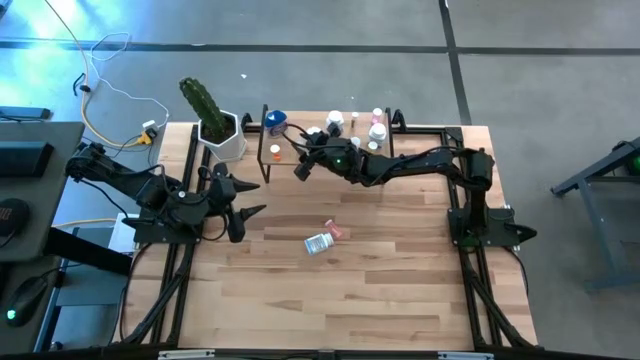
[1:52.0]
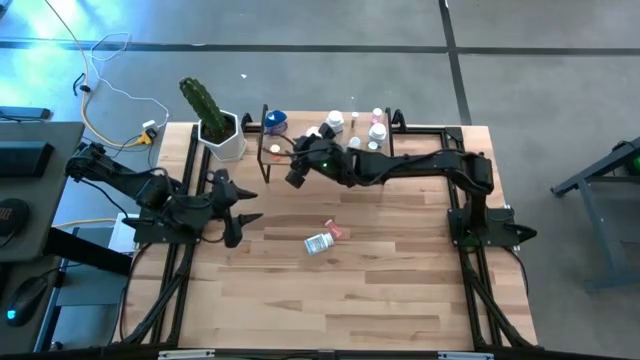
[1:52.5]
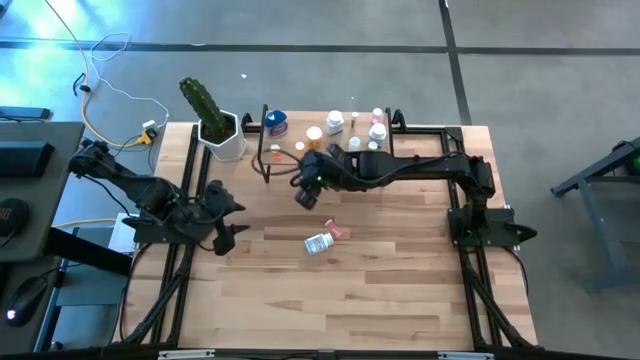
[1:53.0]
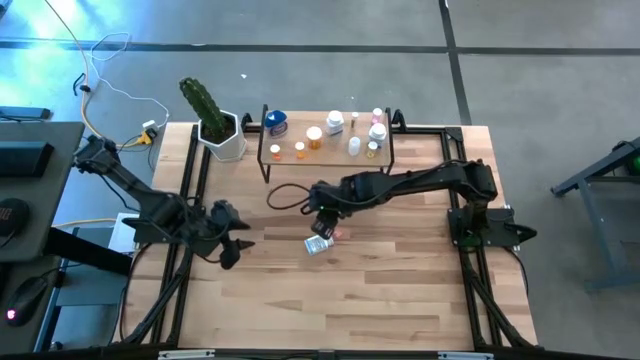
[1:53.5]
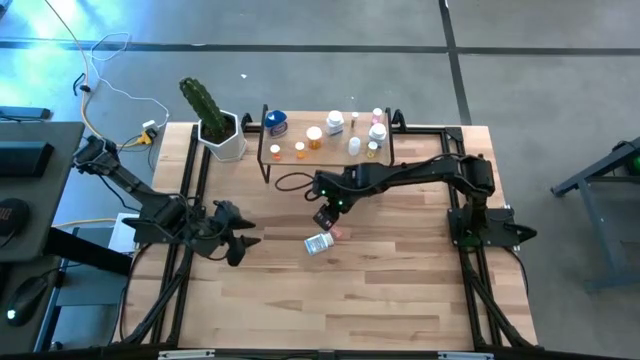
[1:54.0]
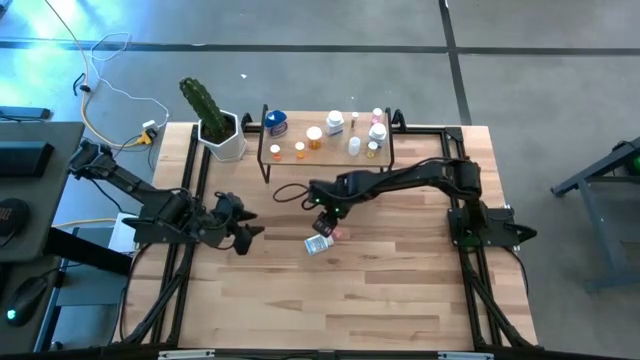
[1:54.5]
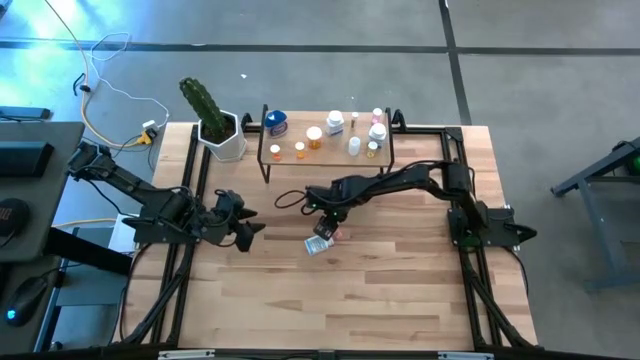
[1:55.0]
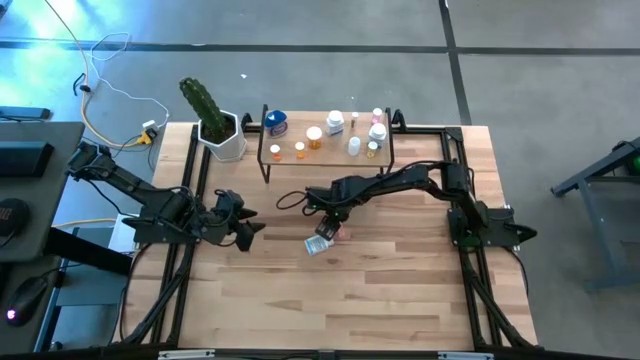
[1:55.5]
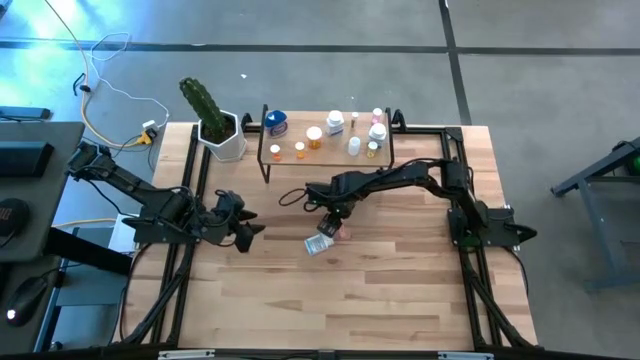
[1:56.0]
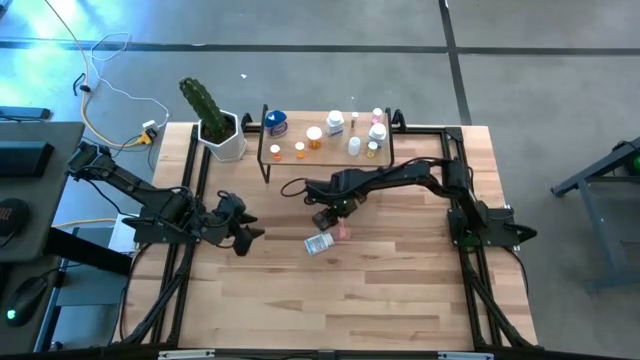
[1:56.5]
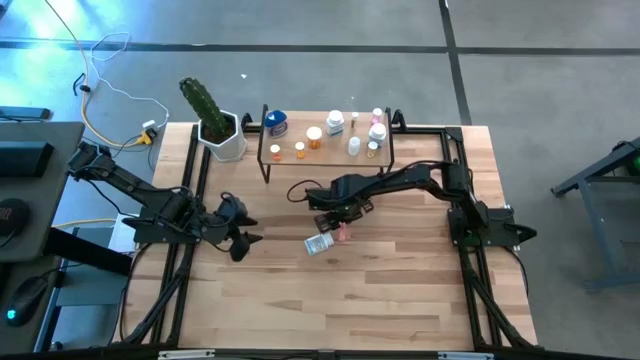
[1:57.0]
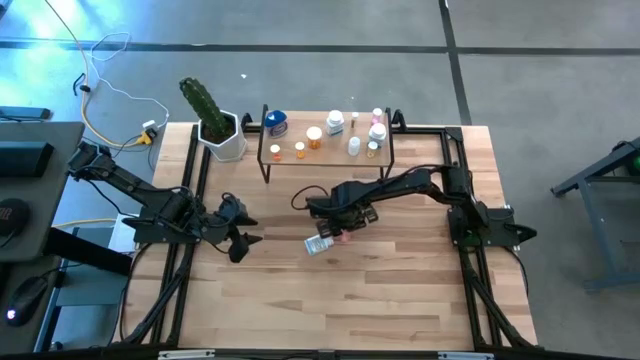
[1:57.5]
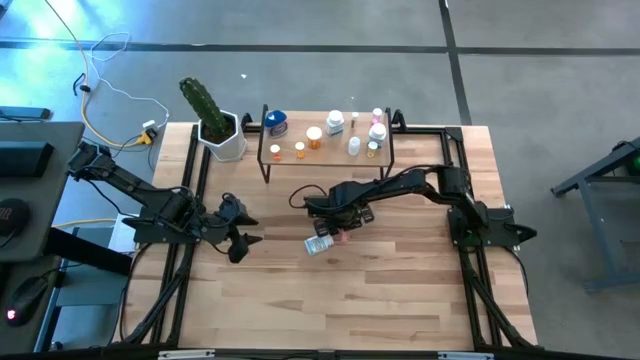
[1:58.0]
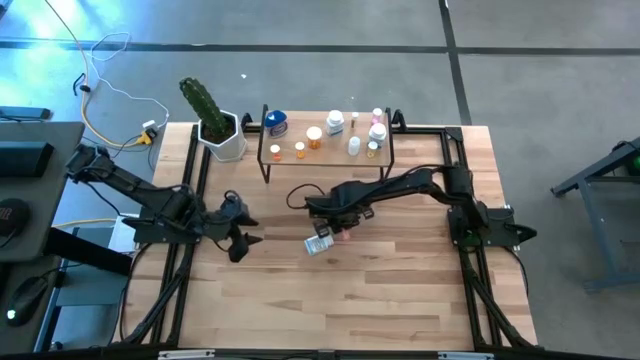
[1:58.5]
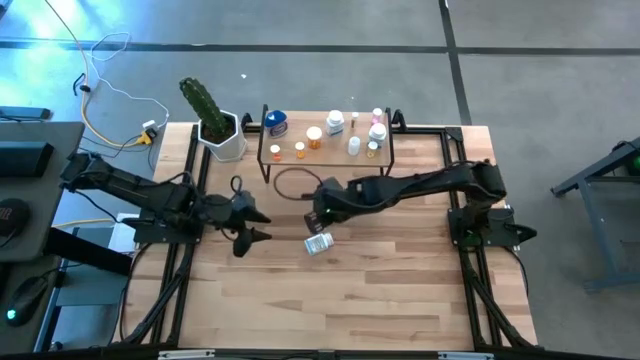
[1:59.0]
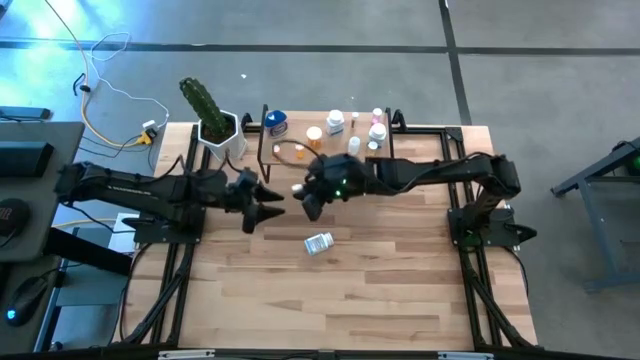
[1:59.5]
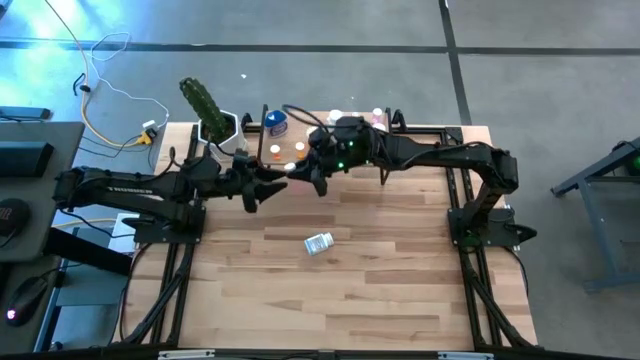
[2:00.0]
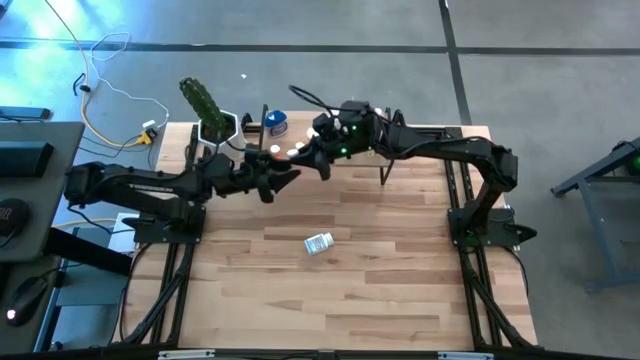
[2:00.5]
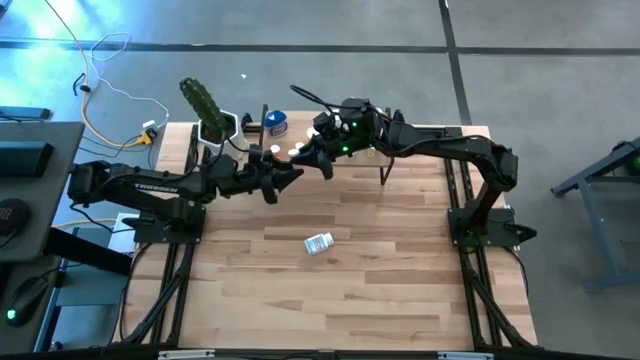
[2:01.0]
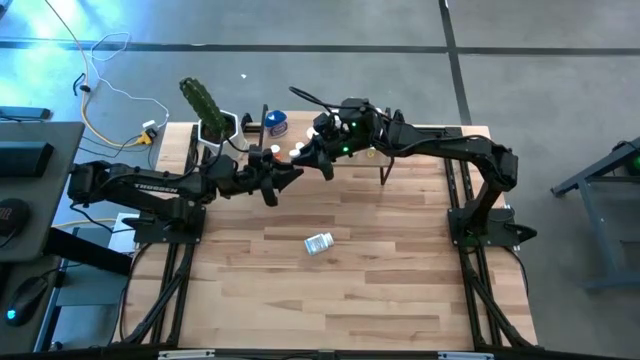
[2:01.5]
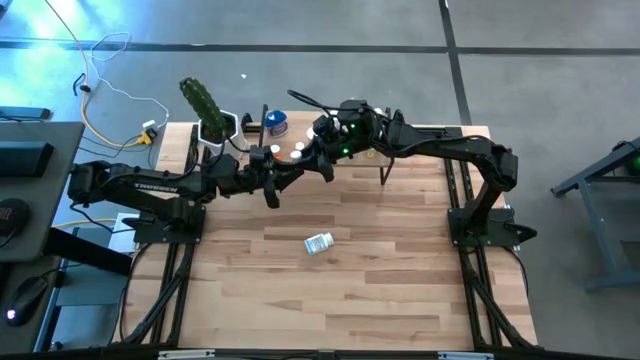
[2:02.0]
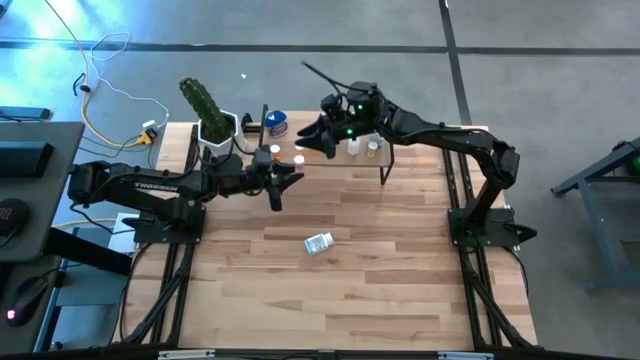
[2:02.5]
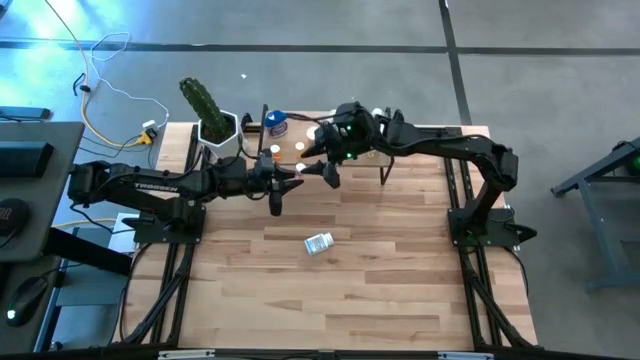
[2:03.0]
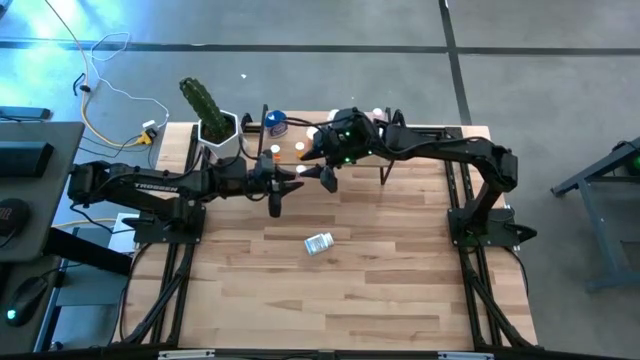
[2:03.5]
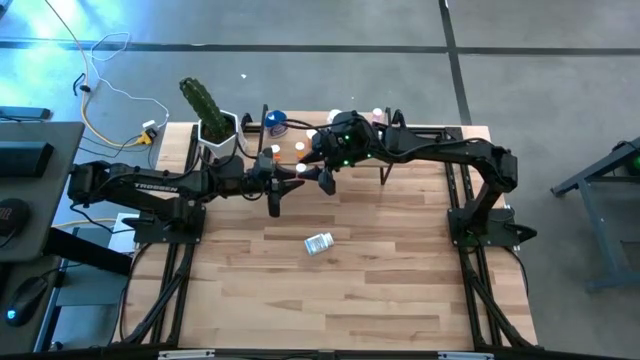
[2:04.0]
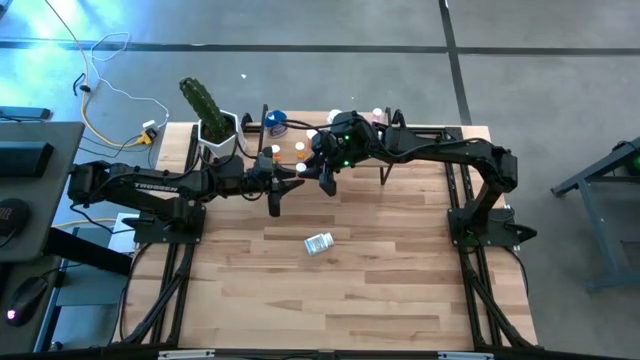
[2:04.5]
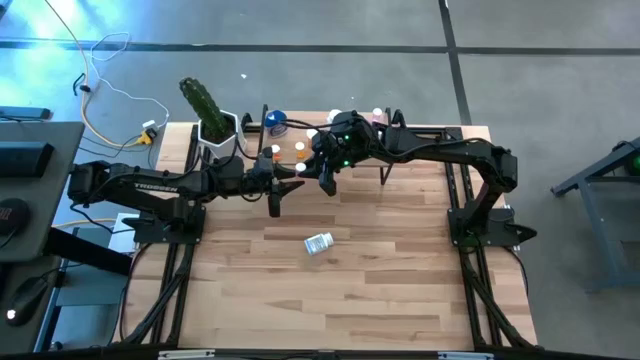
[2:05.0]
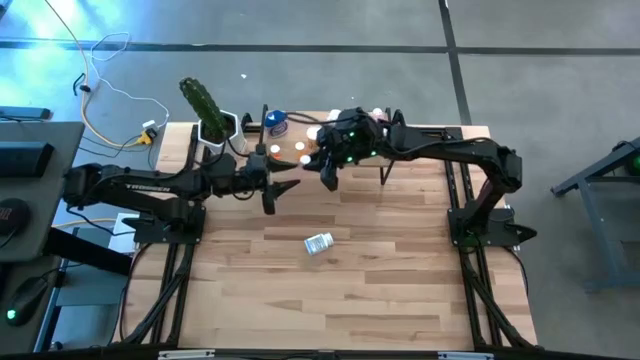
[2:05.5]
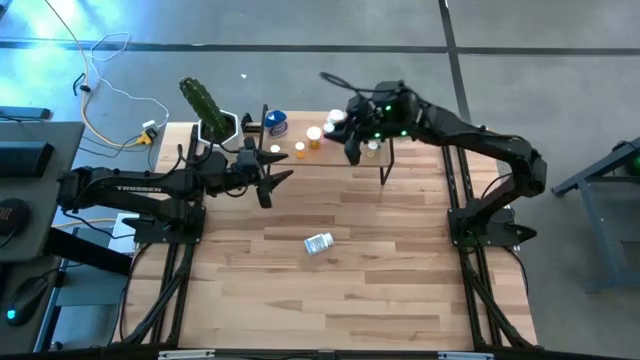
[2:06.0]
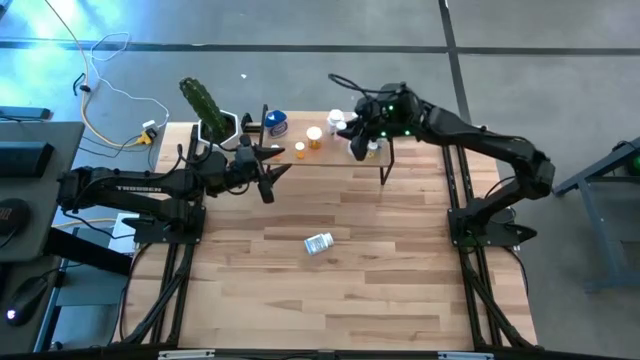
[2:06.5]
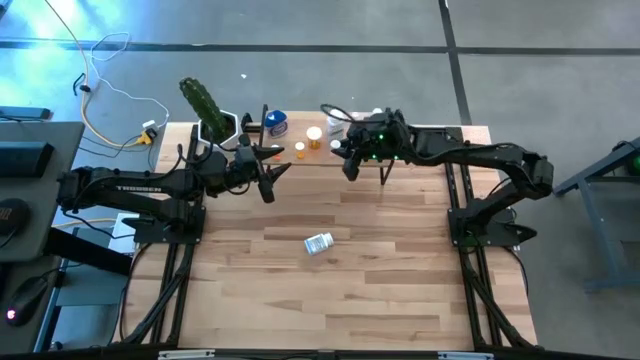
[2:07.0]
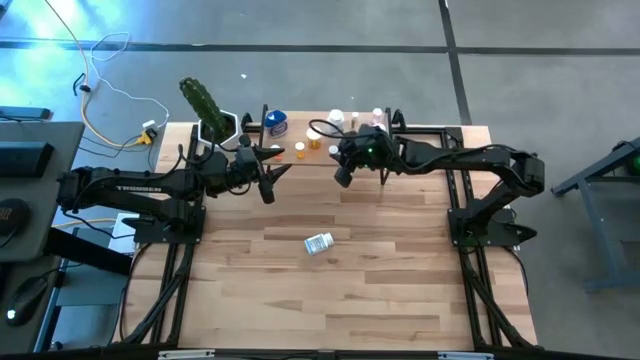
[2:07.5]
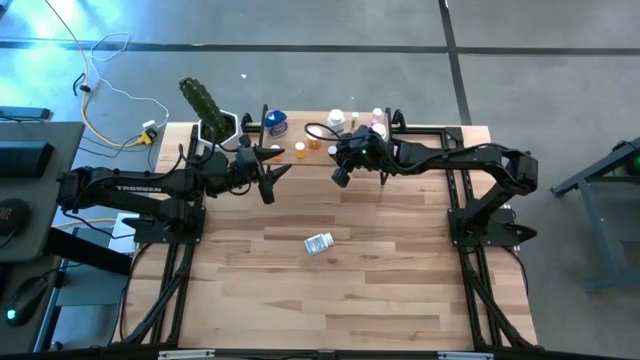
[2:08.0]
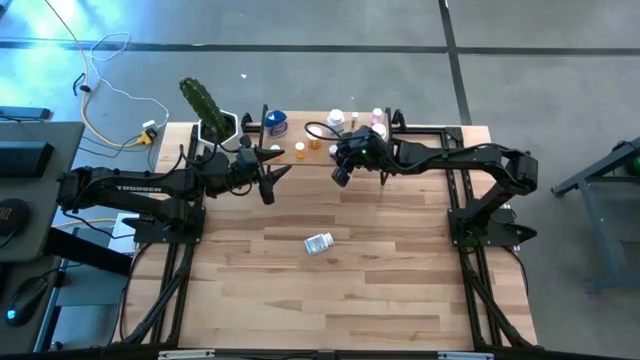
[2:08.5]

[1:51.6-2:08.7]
Task: Pick and place medicine bottles onto shelf by color
Put the pink pill bottle on the shelf

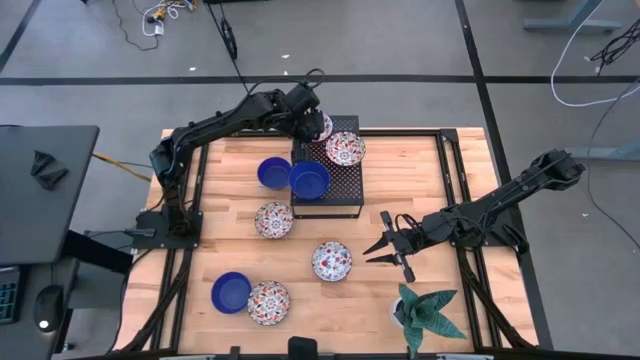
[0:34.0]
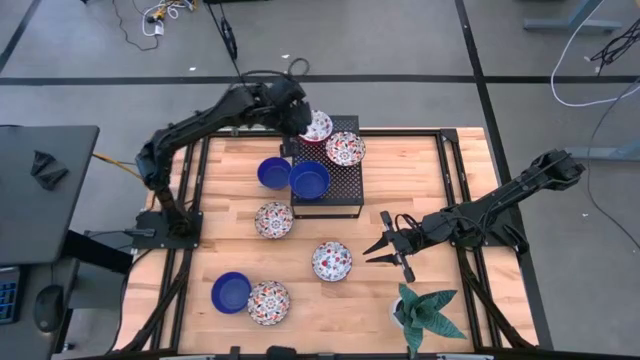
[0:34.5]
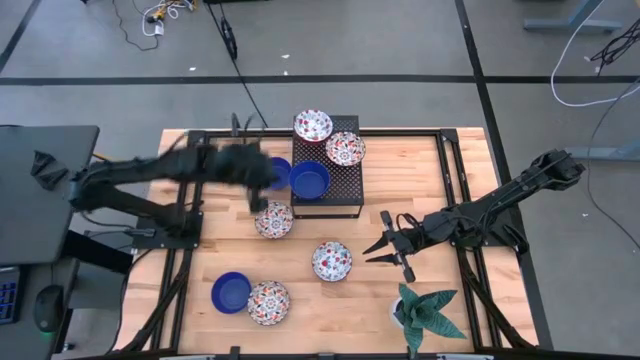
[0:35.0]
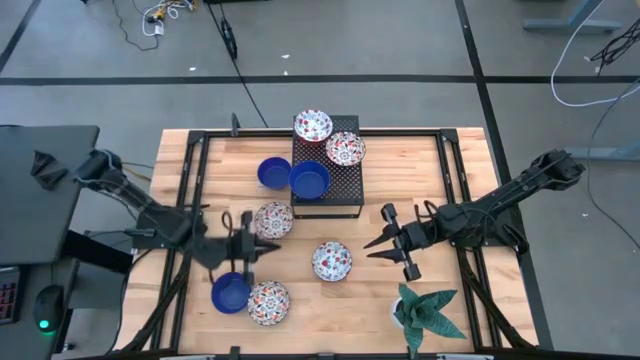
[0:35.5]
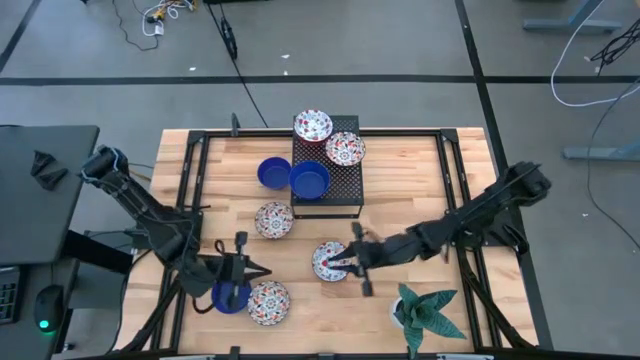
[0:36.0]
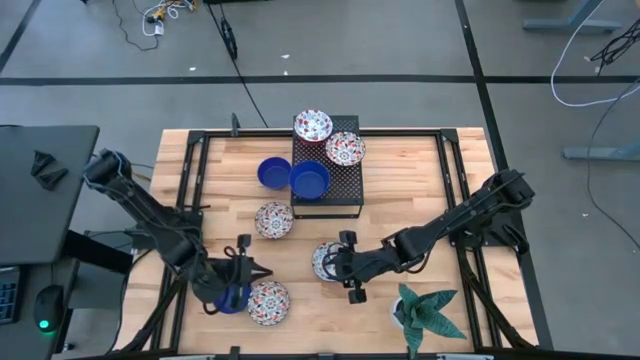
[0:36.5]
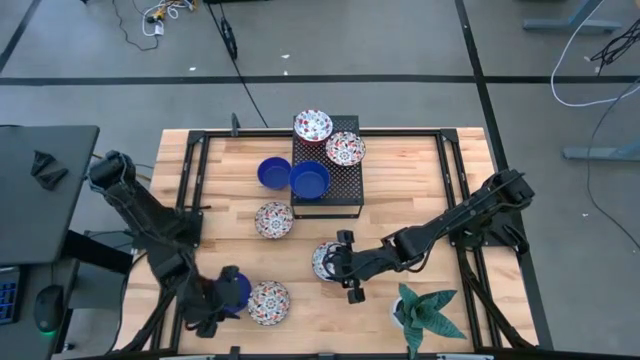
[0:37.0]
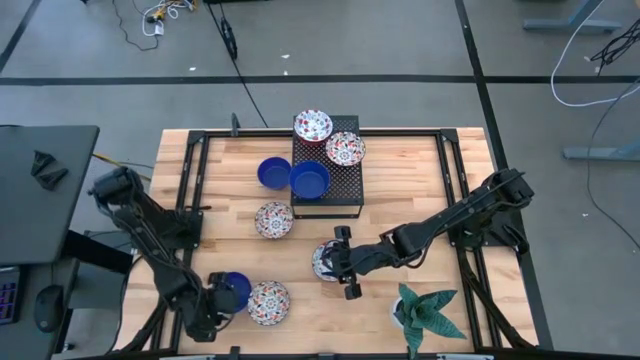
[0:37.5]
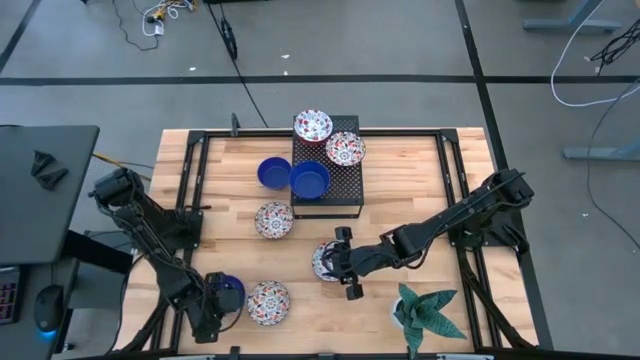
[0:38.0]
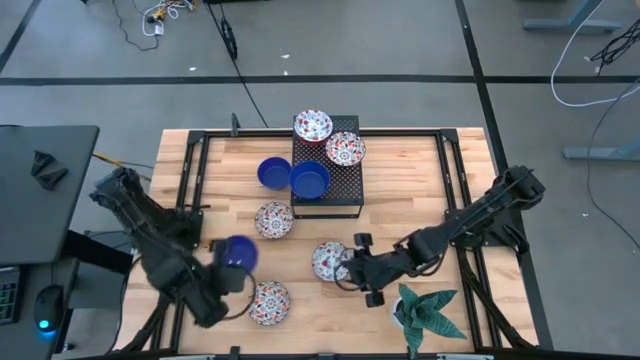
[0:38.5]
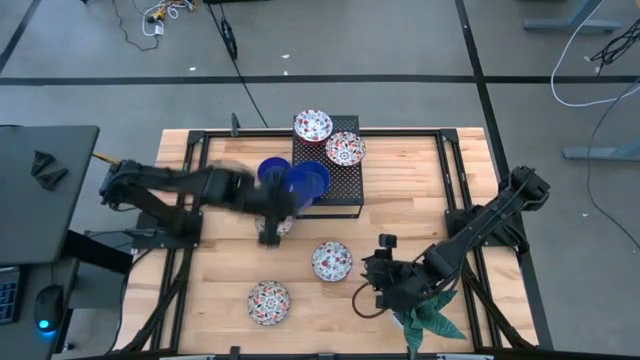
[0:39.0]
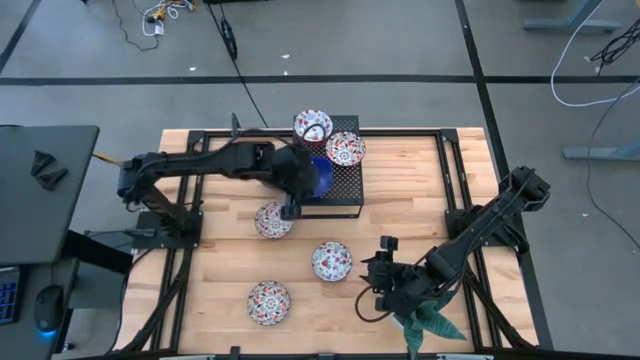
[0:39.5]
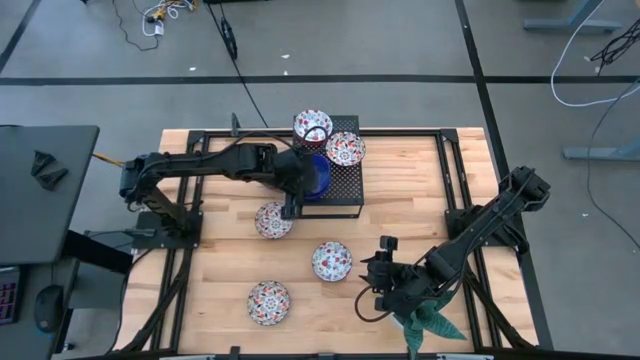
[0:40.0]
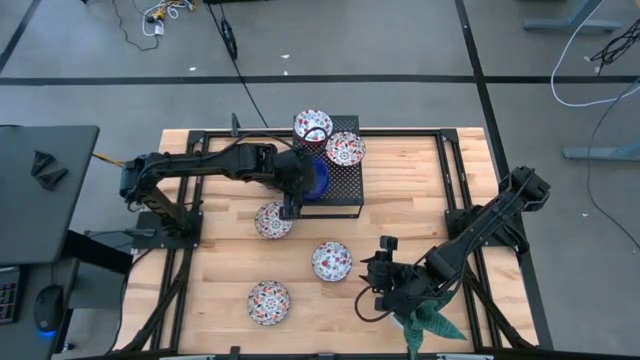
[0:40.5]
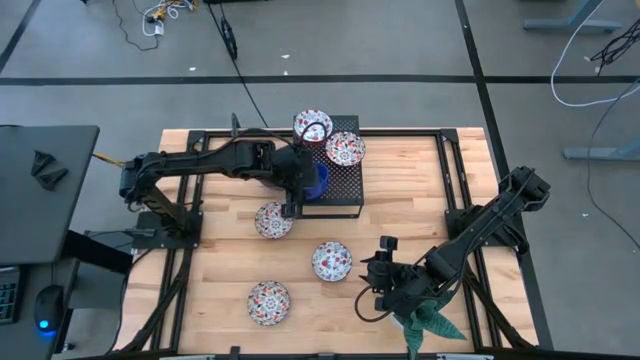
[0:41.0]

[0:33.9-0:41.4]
Task: Pick & Place Mini bowls
Stack the bottom blue bowl on the blue bowl on the shelf
